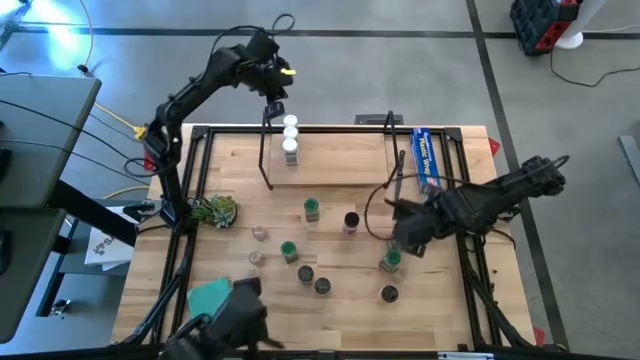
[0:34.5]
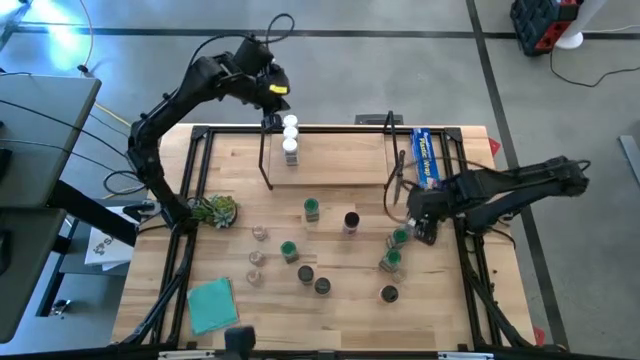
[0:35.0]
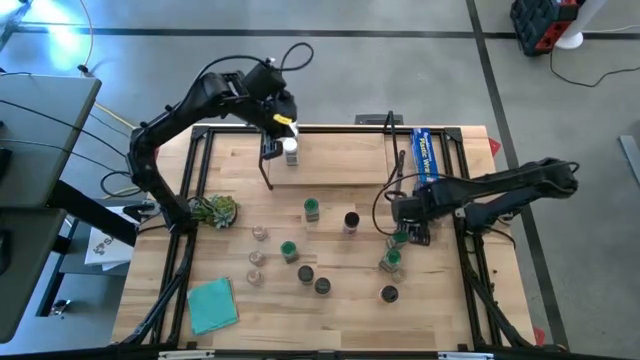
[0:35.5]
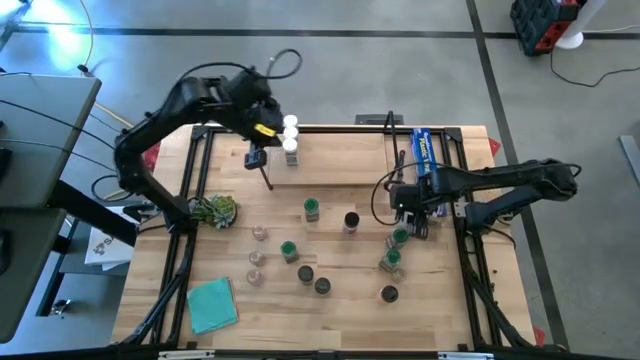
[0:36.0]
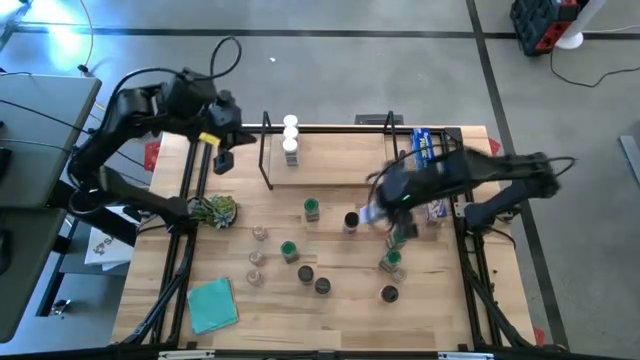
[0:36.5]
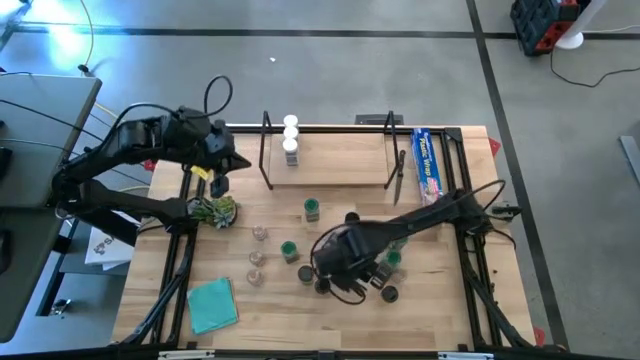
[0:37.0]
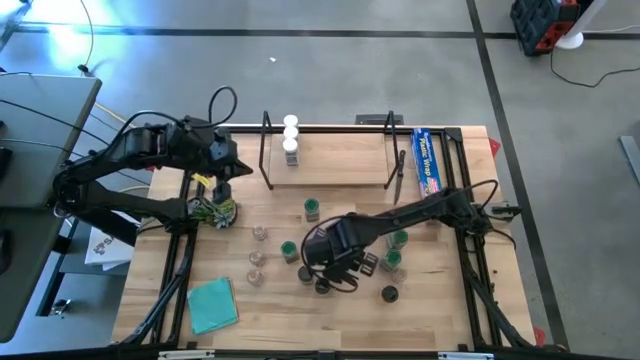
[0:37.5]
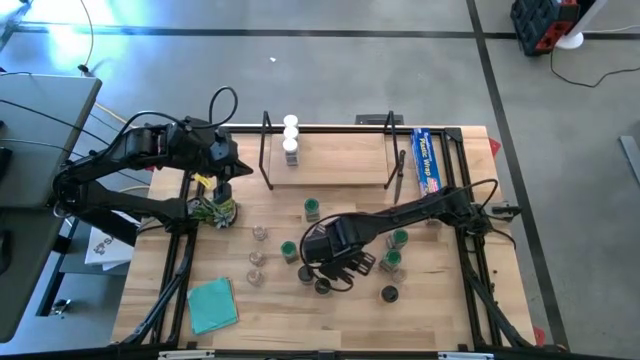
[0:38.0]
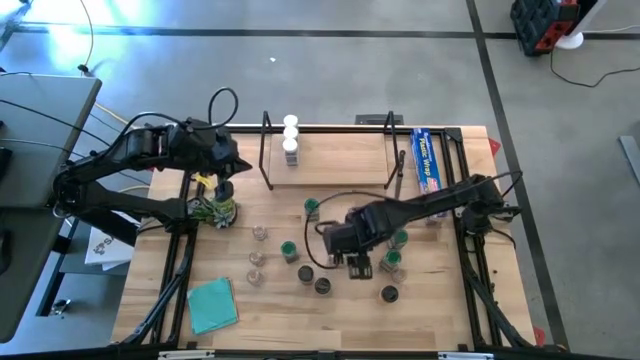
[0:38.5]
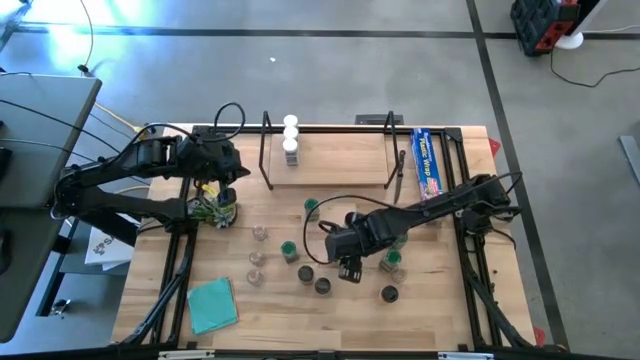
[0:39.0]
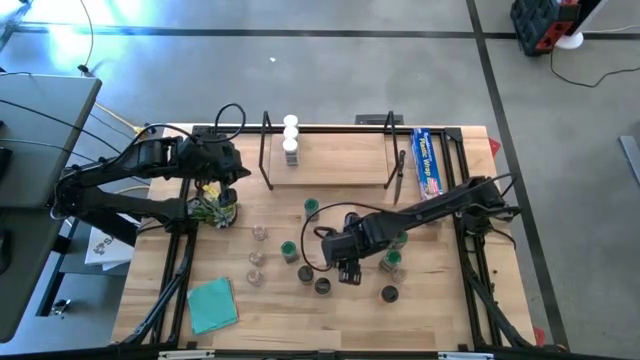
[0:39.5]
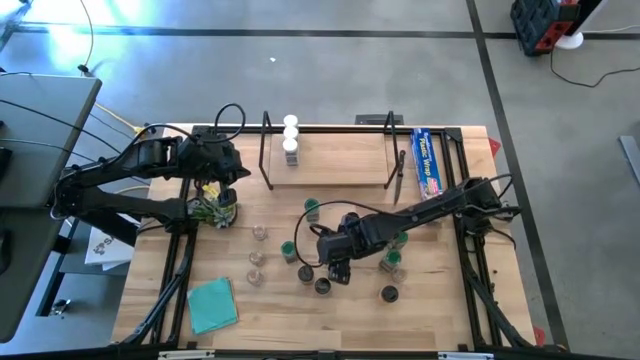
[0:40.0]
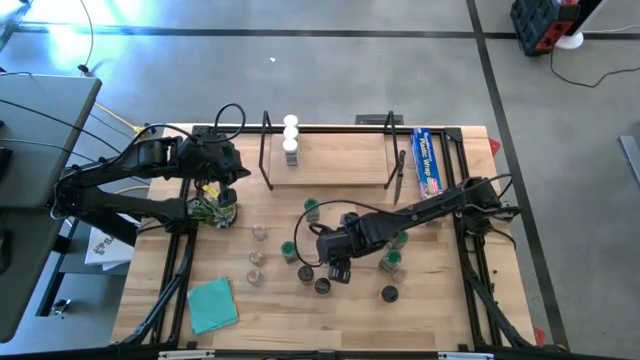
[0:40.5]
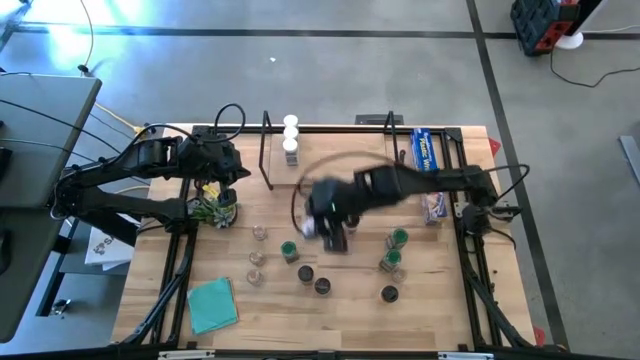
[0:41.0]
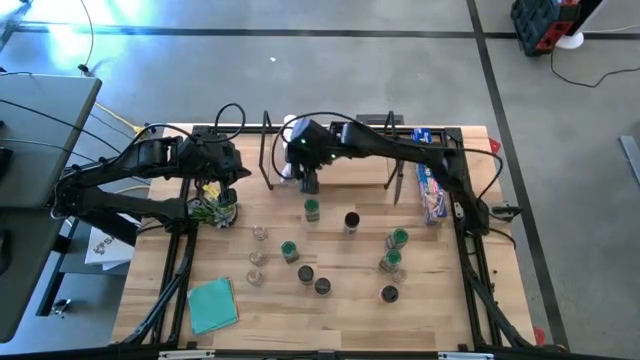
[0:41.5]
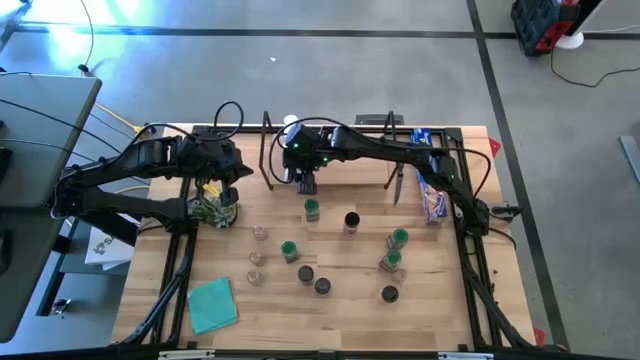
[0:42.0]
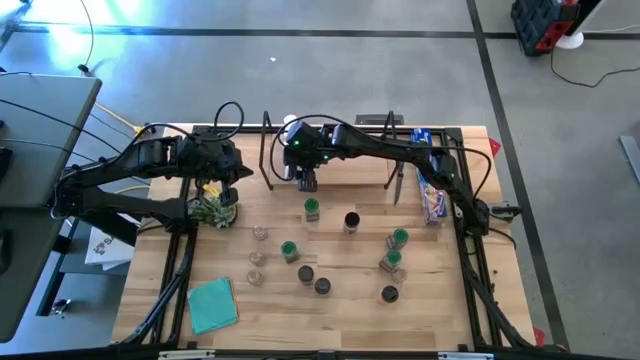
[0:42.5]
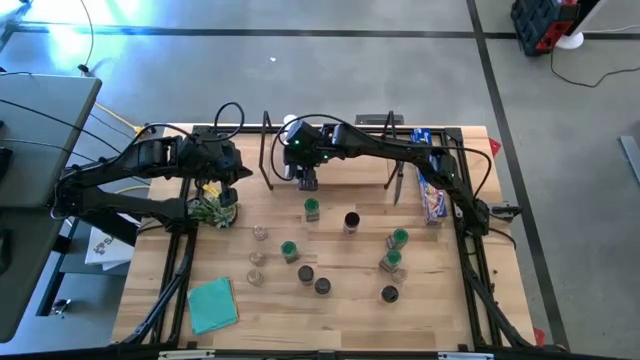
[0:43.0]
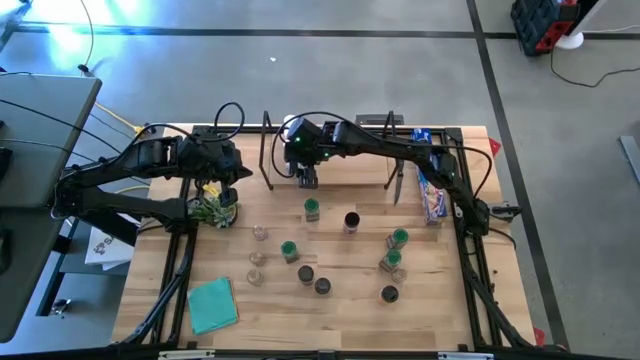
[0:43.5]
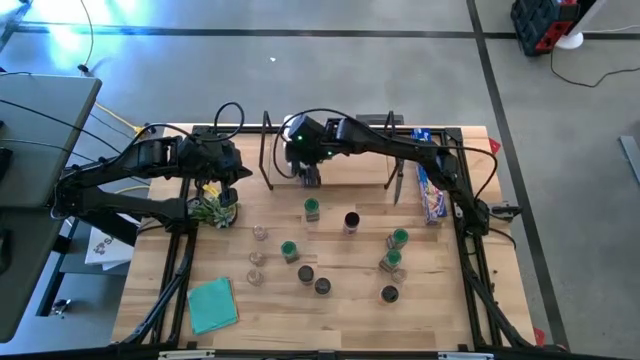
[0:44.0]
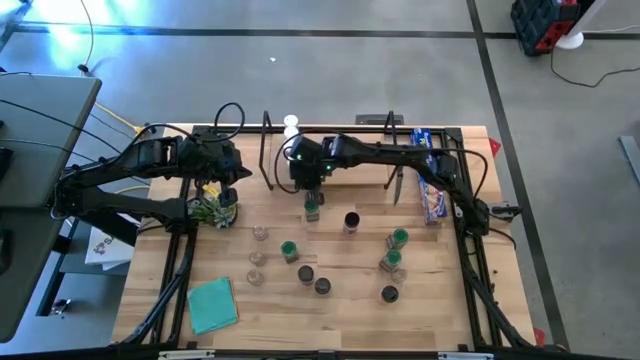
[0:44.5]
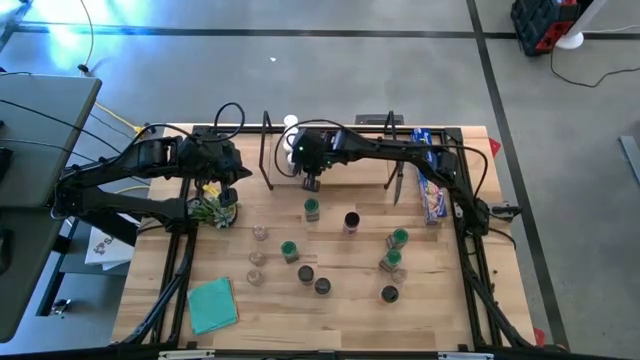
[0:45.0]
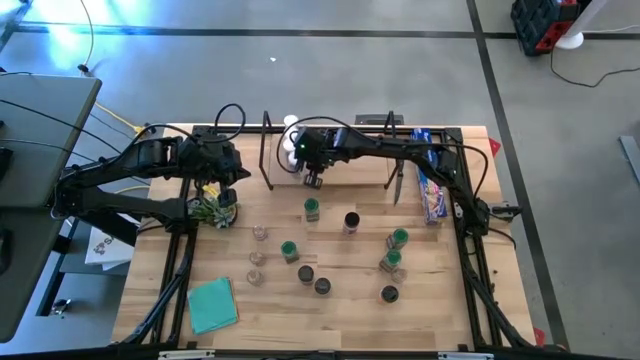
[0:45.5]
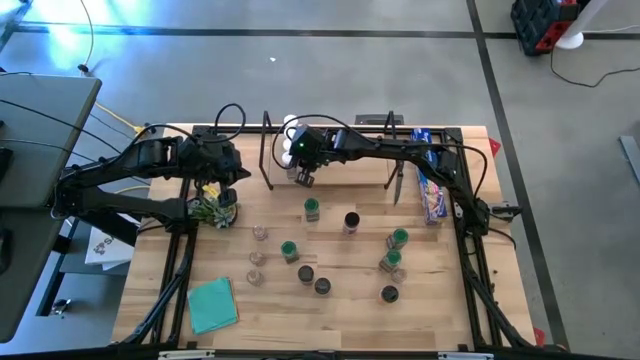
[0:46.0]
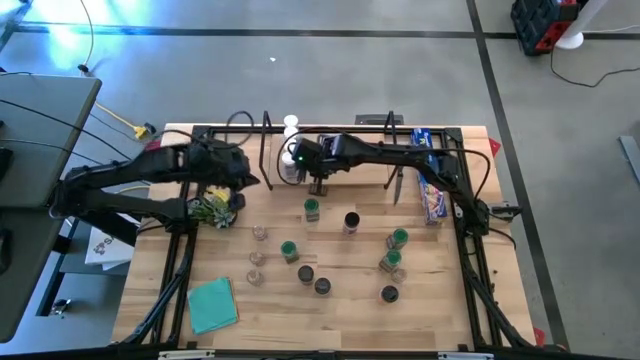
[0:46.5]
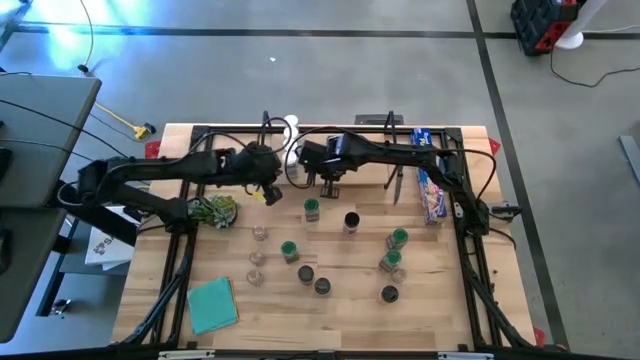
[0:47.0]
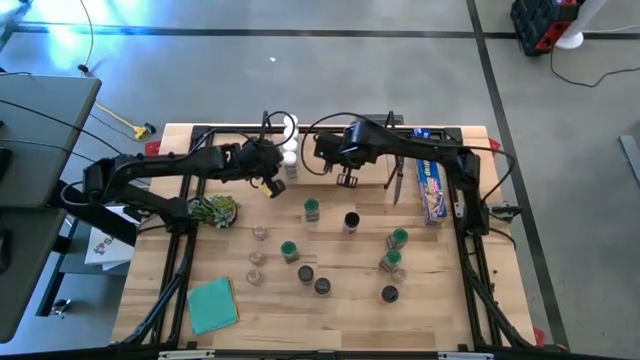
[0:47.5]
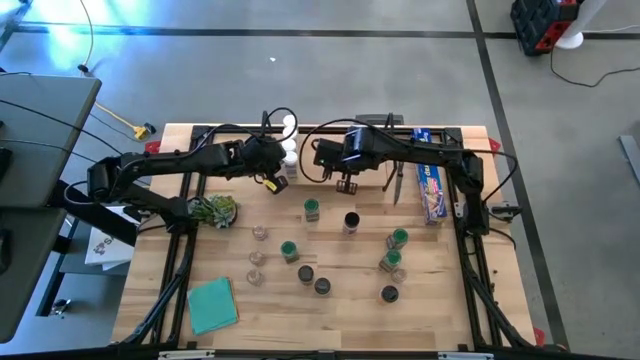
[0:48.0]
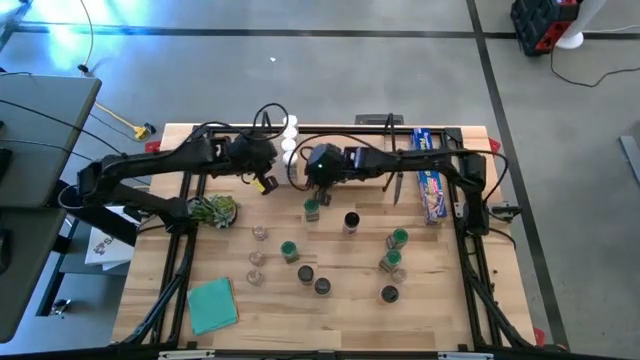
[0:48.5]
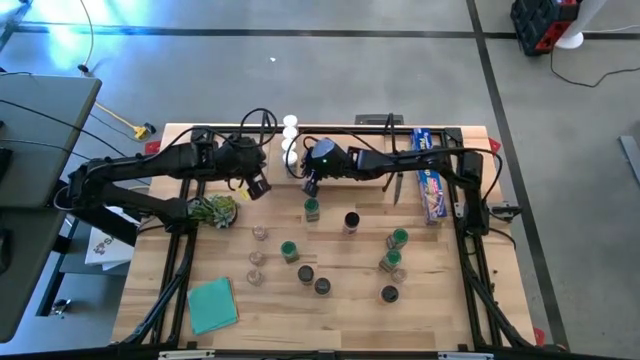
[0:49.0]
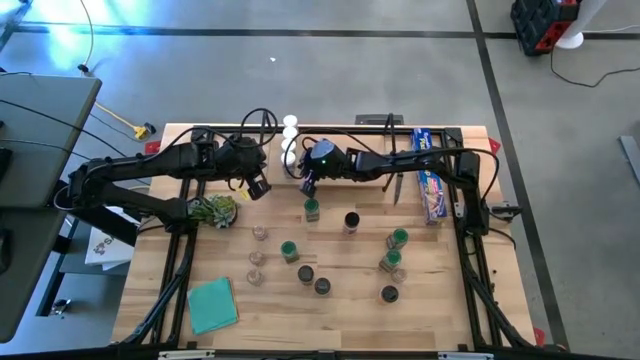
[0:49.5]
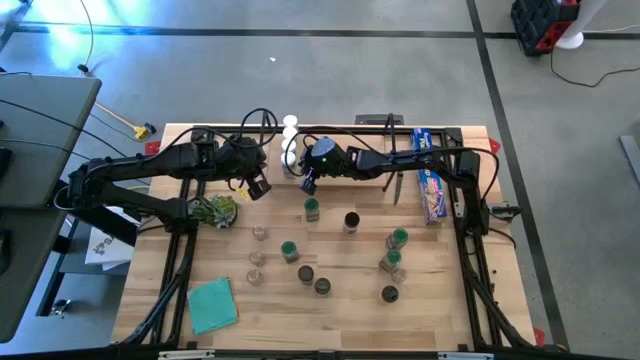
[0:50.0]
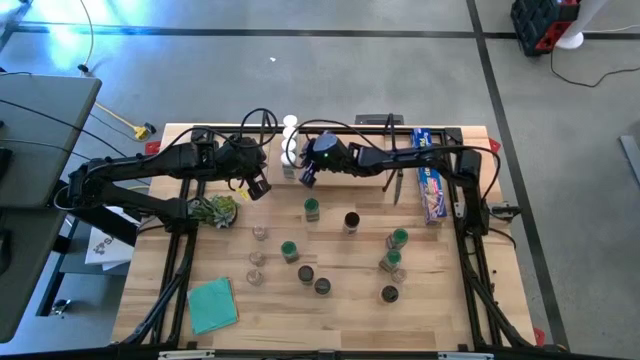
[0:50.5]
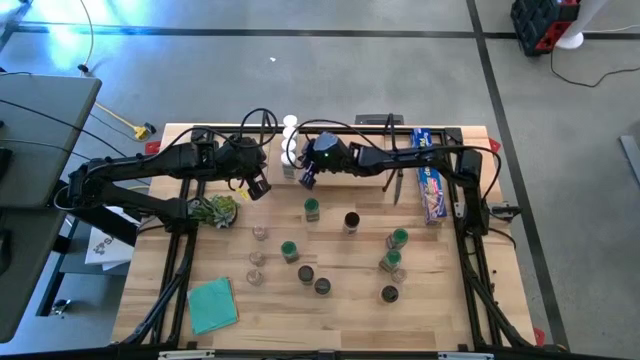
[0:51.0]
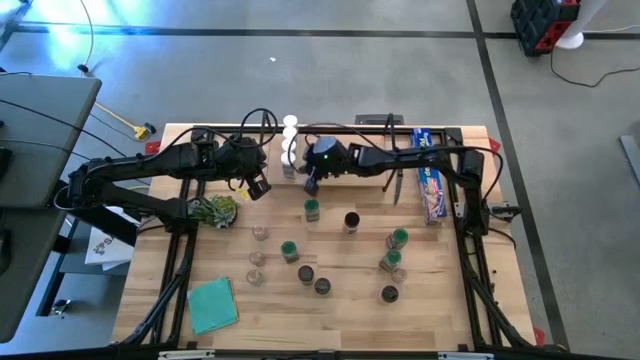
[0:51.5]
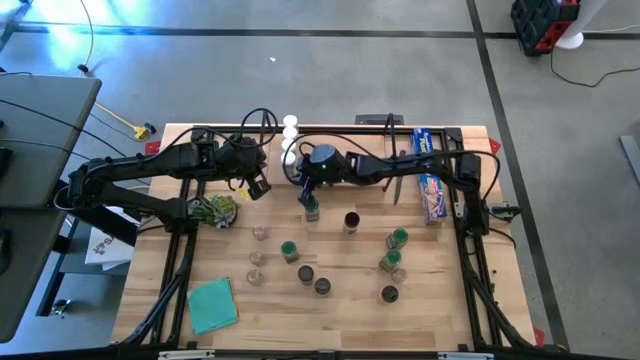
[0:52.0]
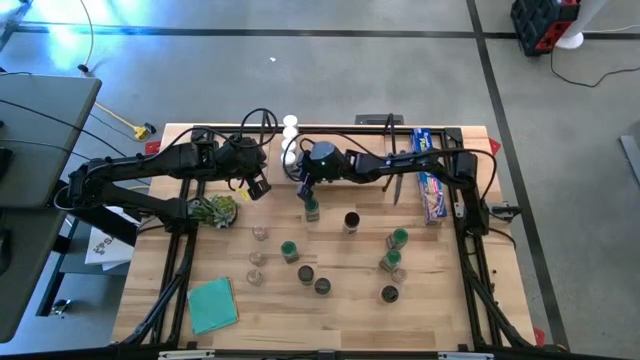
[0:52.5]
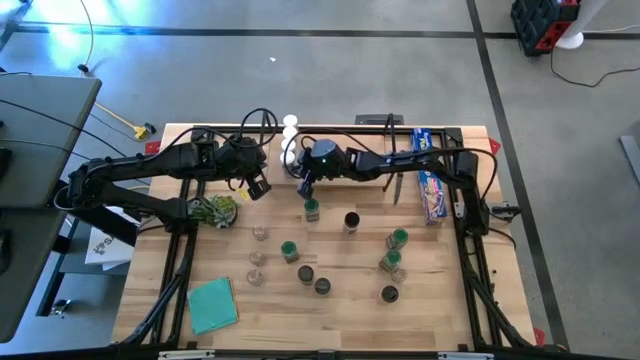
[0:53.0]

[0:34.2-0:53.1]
Task: Shelf spices
Put the white seasoning bottle on the shelf aligned with the other white seasoning bottles

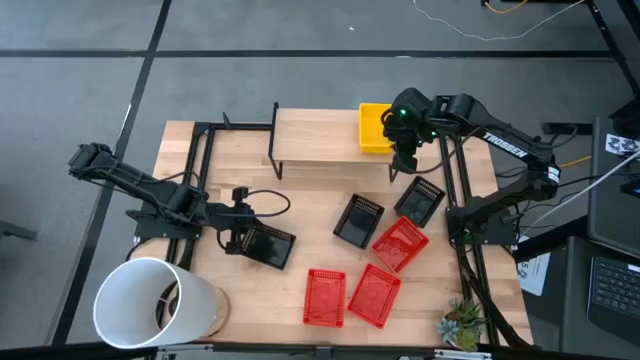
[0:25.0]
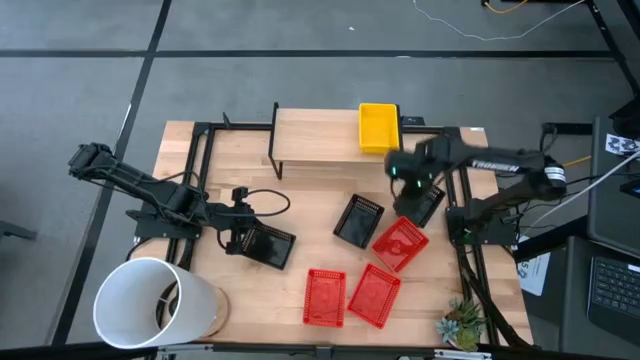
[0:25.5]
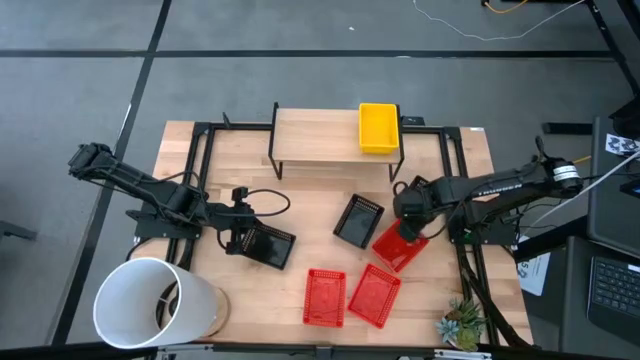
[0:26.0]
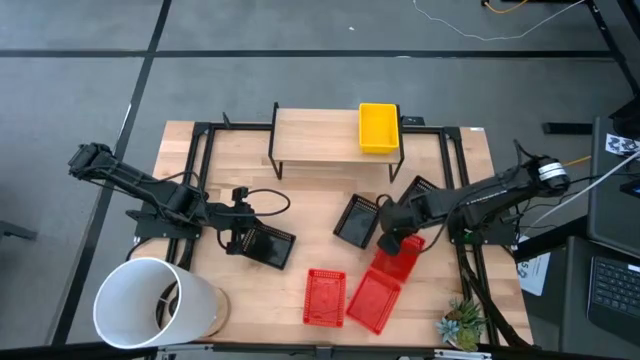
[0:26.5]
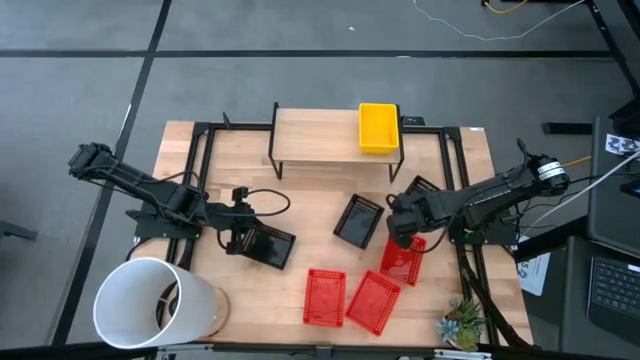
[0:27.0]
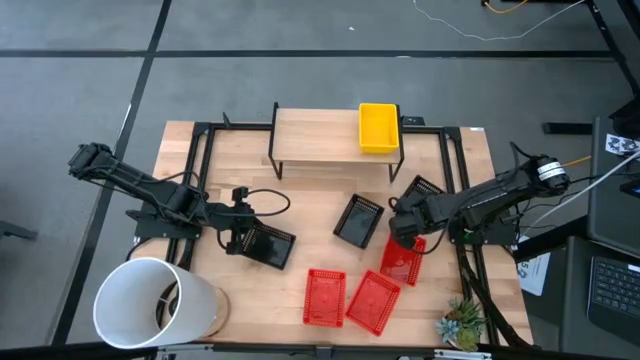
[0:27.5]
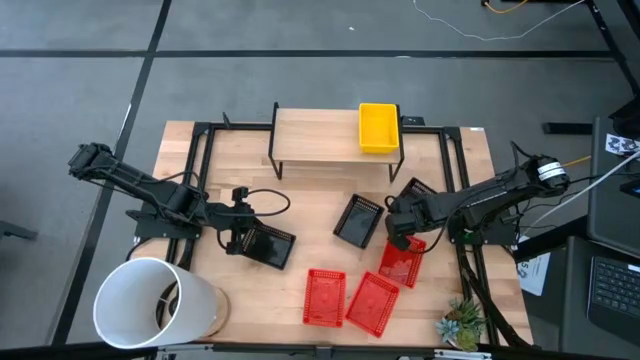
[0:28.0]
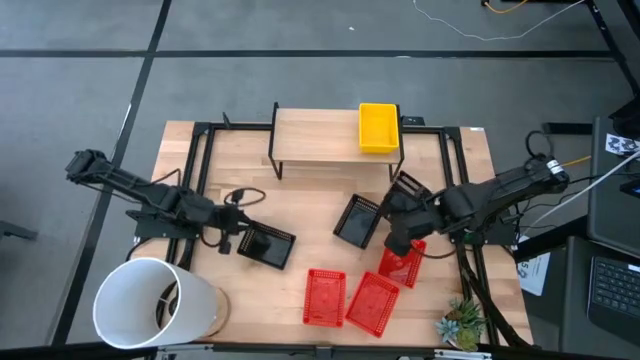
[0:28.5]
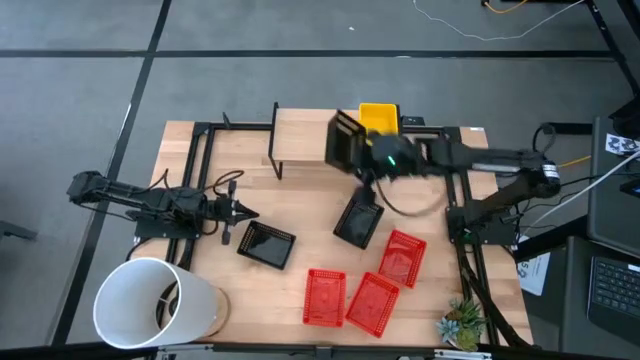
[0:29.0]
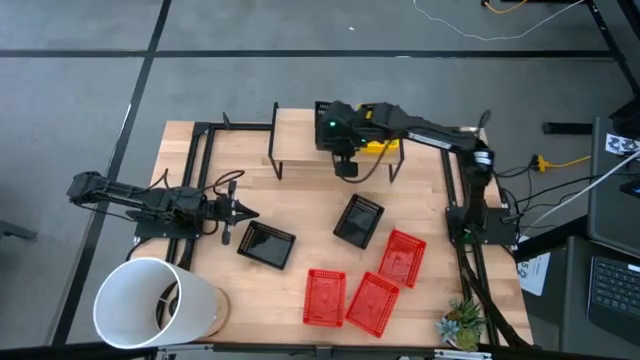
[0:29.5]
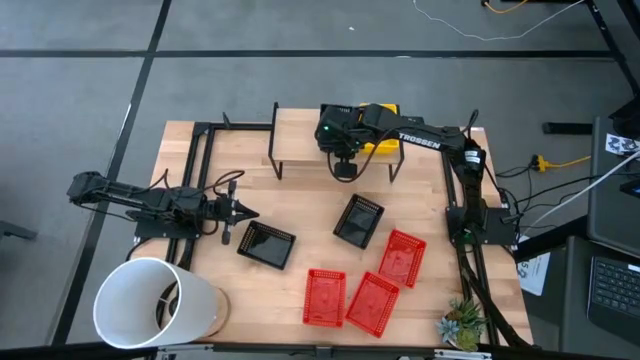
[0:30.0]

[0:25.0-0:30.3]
Task: Stack baskets on shelf by color
Put the right black basket on the shelf
